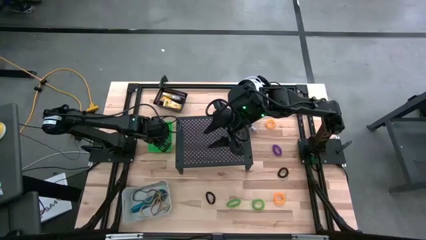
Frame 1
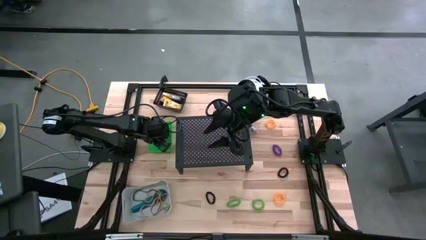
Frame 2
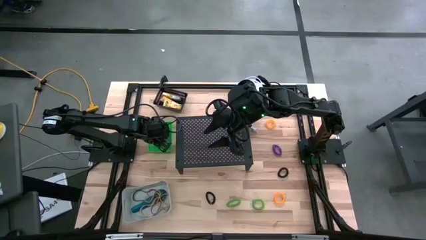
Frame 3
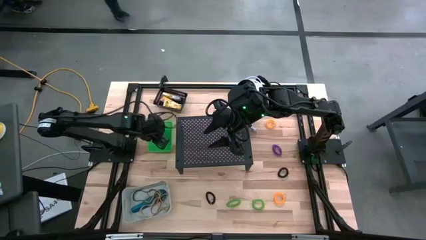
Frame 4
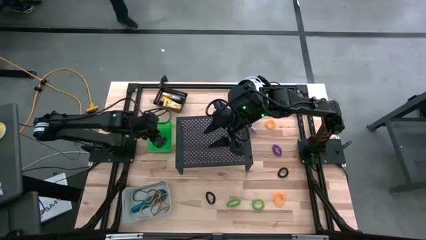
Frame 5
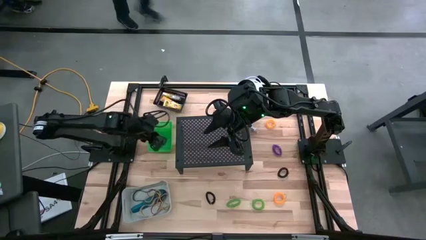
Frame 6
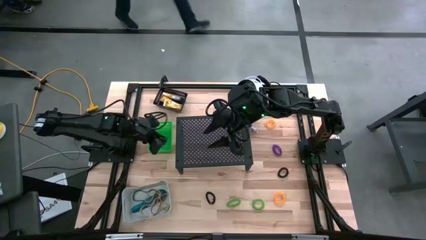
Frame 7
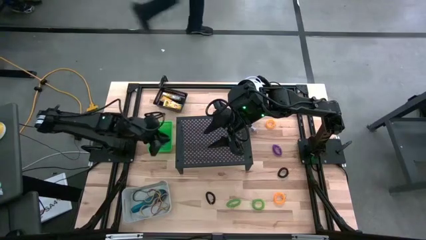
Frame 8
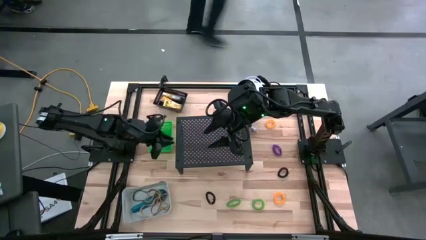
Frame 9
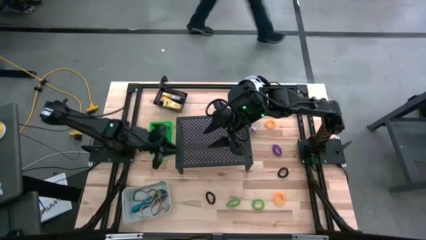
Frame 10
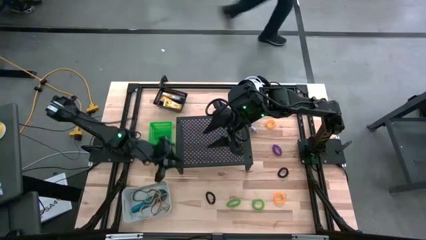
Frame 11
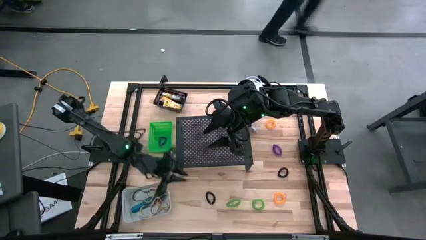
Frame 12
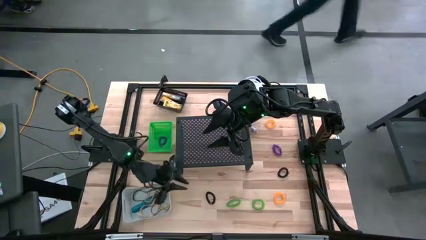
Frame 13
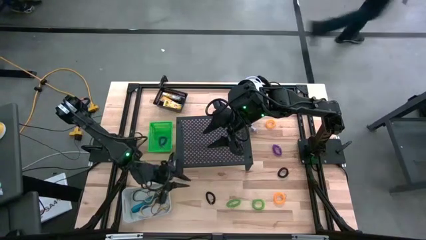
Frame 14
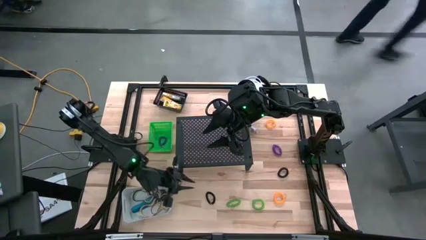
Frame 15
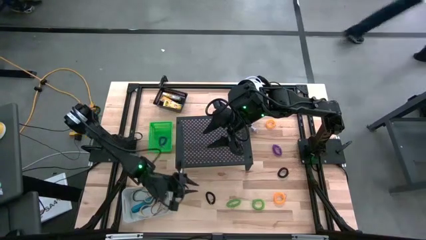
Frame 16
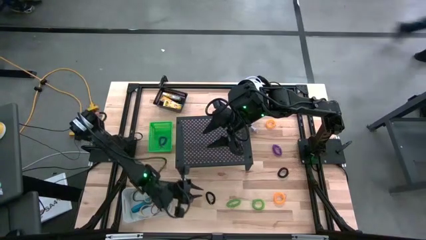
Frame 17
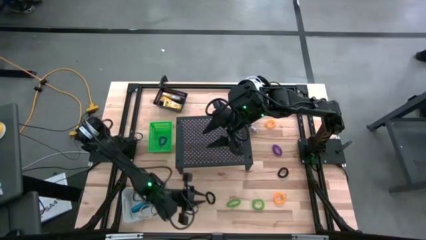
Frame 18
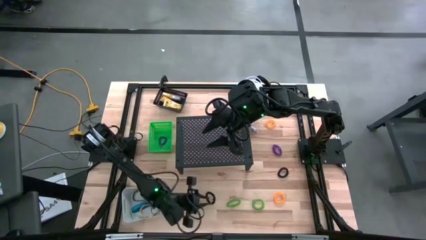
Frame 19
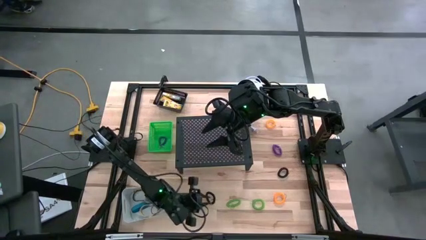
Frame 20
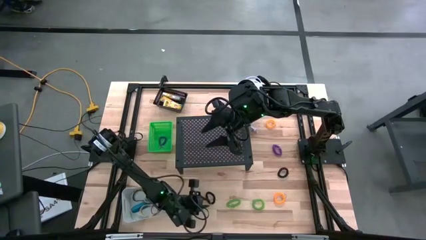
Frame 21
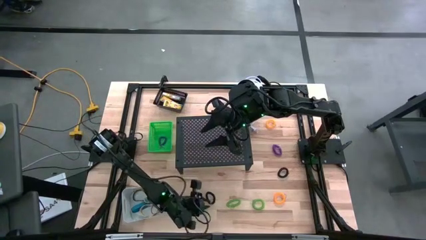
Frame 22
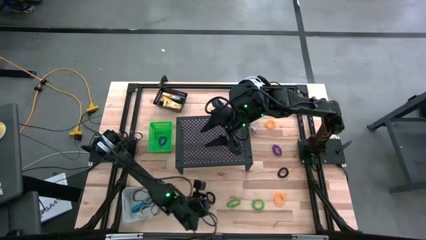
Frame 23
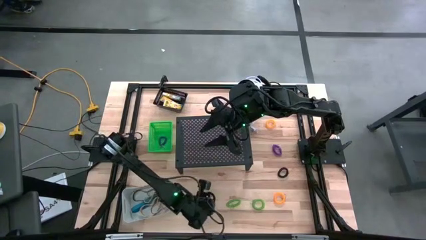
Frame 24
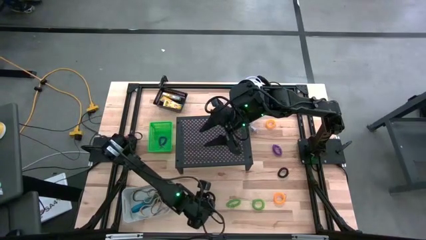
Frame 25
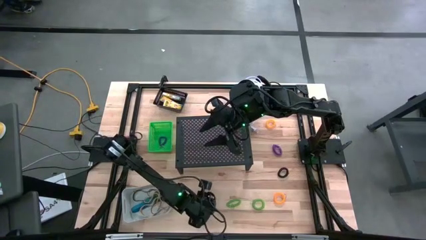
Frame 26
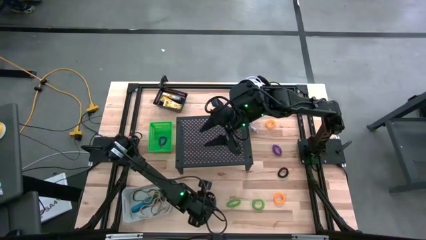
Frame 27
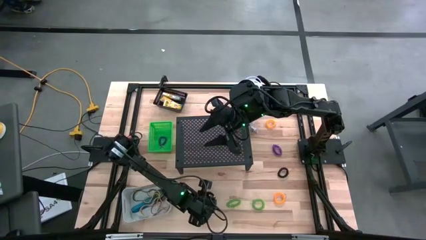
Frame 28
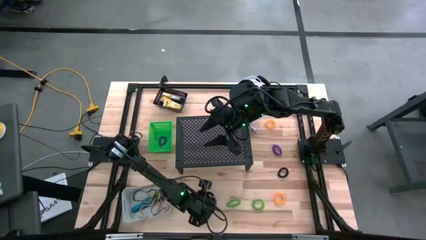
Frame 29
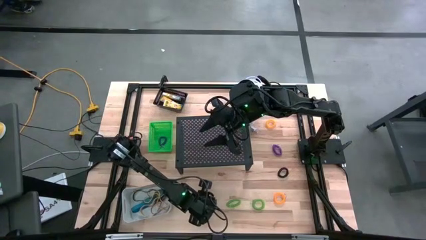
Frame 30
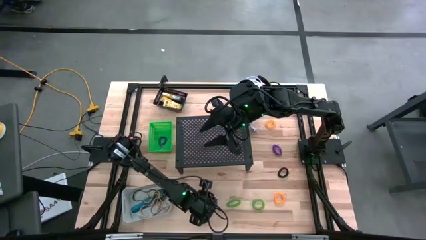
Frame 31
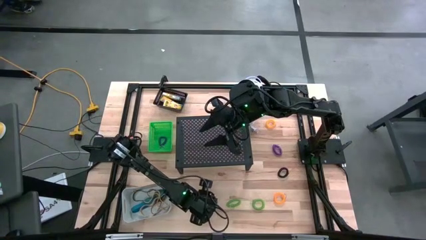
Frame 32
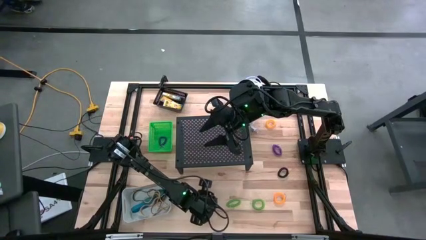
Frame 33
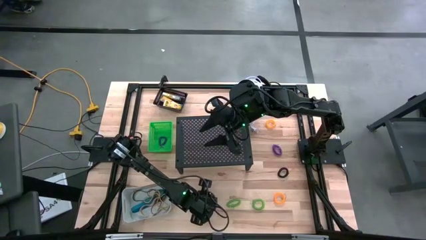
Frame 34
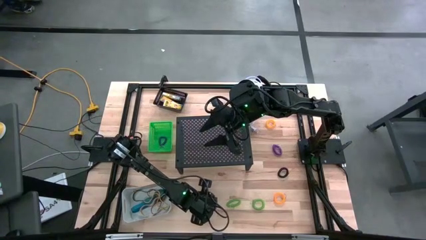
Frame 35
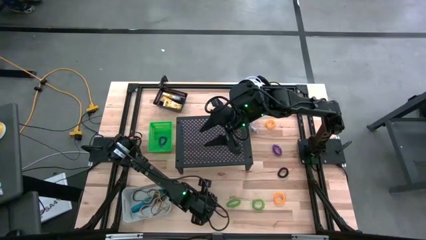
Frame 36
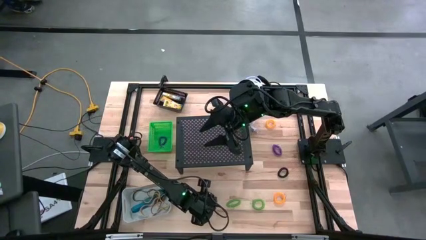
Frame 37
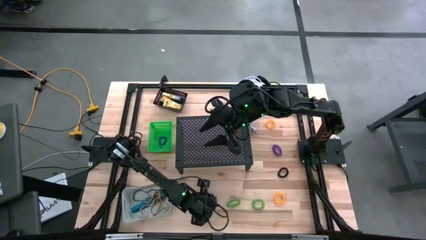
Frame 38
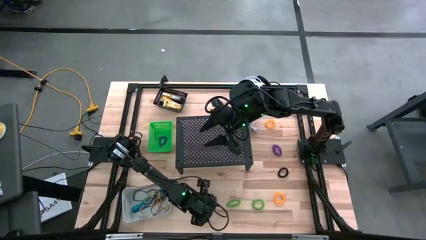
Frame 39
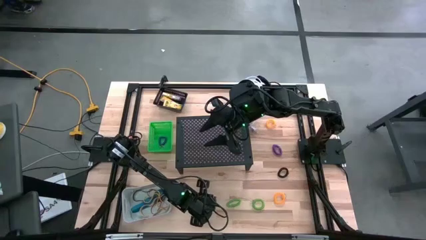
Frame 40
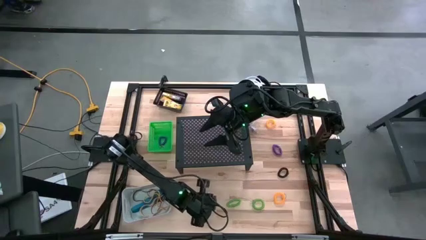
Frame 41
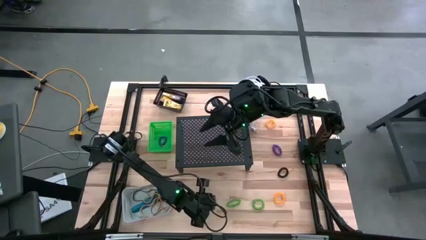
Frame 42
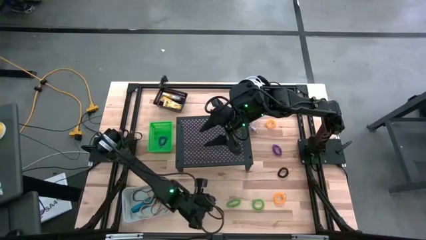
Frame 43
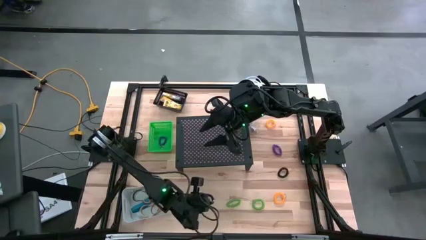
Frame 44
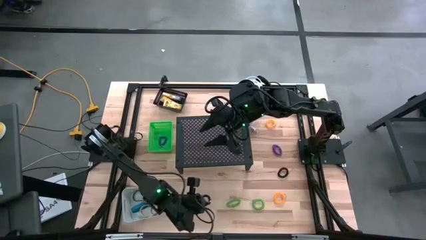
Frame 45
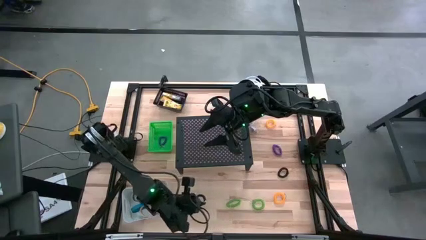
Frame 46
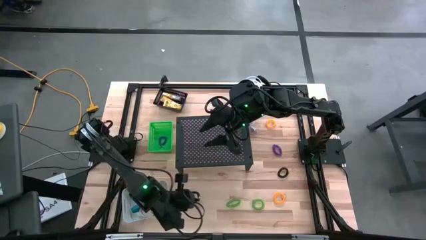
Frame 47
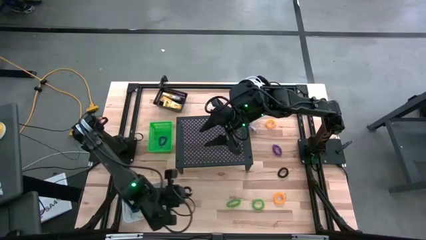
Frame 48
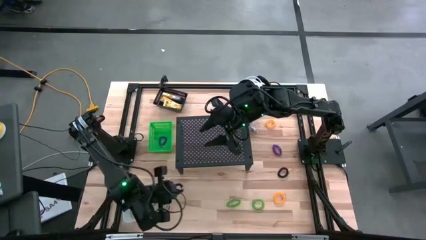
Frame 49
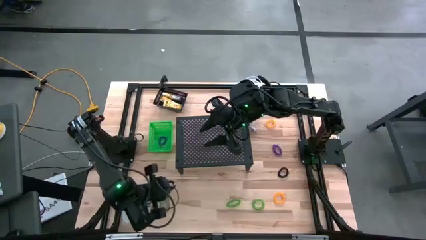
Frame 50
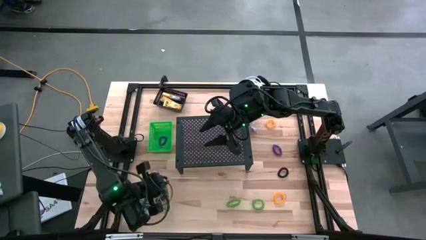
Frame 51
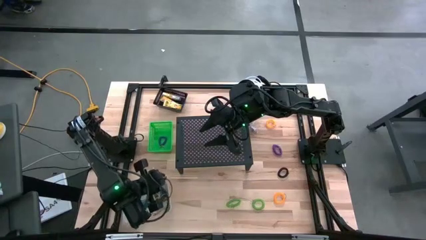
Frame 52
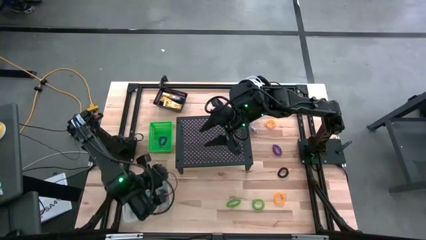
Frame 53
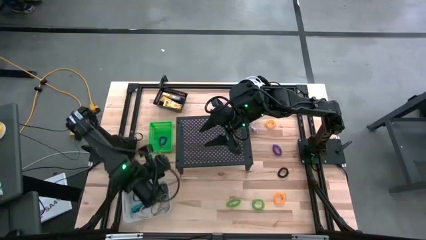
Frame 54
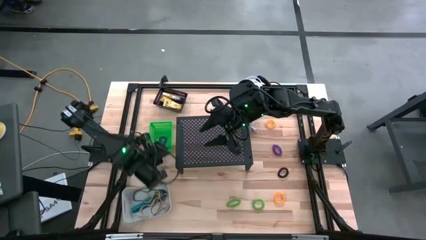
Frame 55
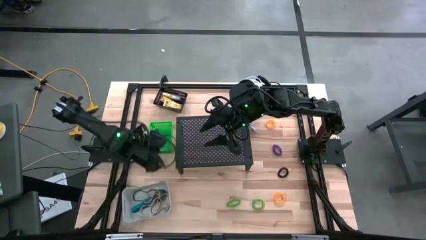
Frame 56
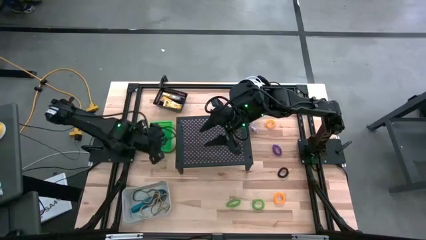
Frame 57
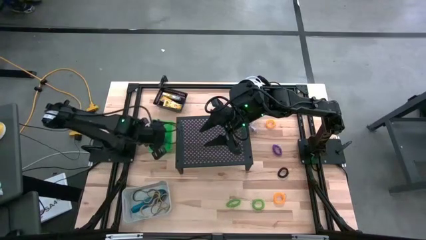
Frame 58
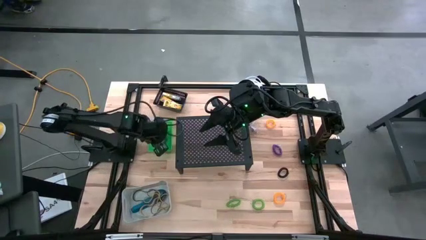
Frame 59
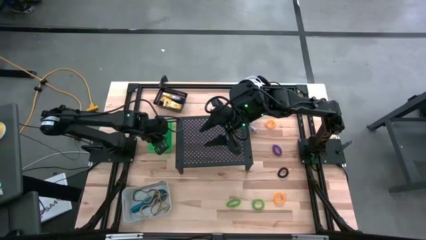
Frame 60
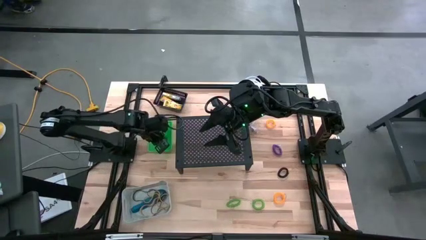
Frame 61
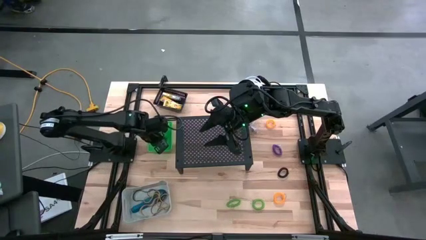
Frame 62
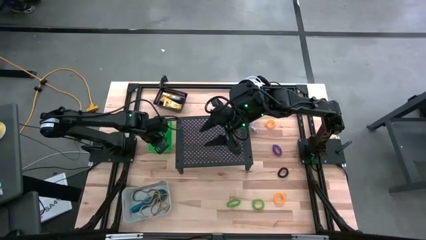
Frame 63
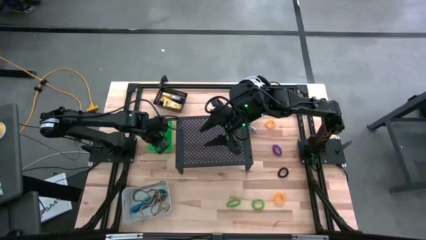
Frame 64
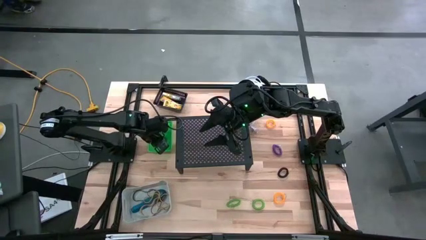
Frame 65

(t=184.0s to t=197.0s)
Task: Pick & Place Office Desk Supplies
Put the left black spring keychain into the green bin

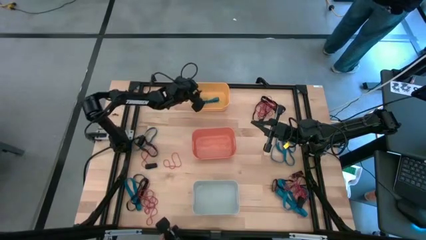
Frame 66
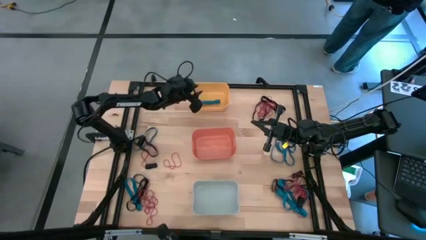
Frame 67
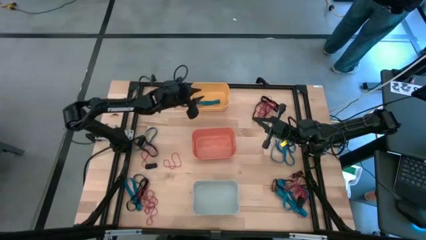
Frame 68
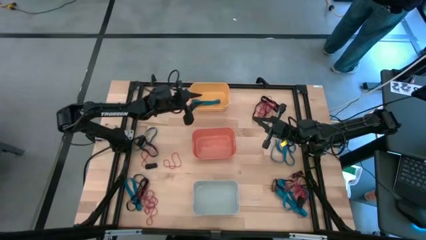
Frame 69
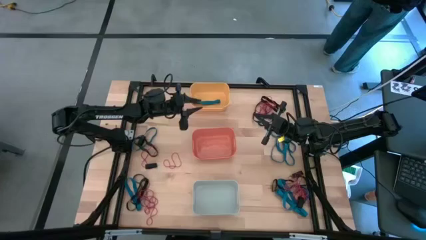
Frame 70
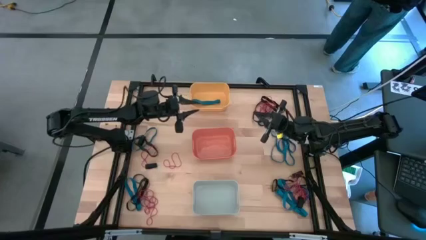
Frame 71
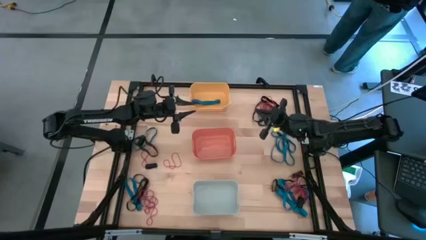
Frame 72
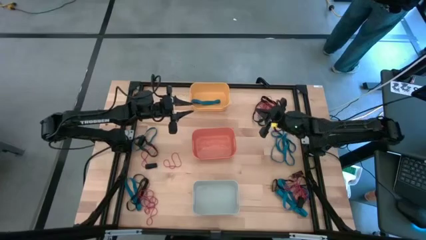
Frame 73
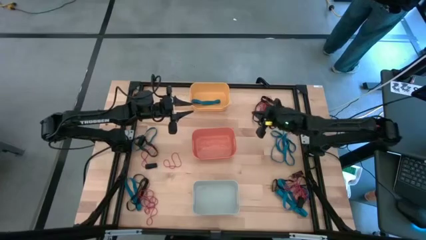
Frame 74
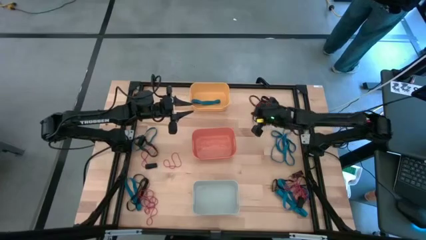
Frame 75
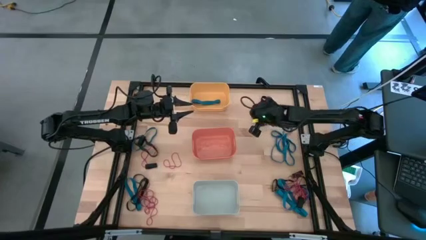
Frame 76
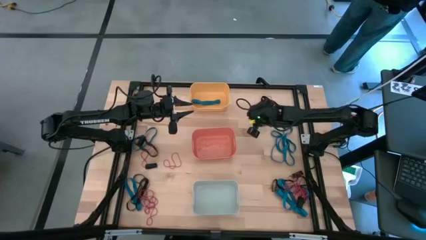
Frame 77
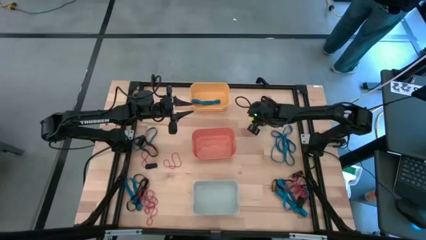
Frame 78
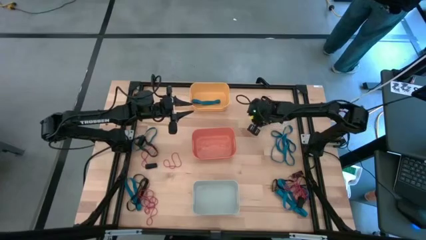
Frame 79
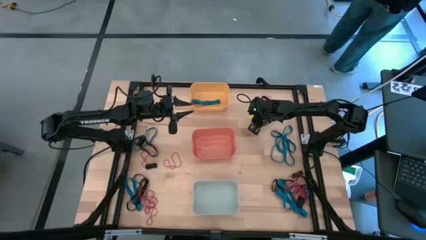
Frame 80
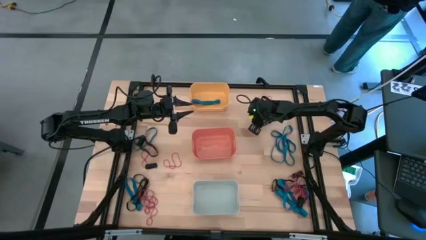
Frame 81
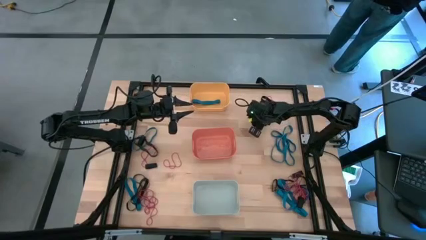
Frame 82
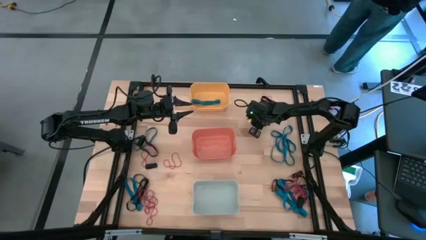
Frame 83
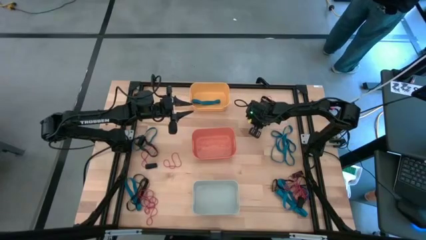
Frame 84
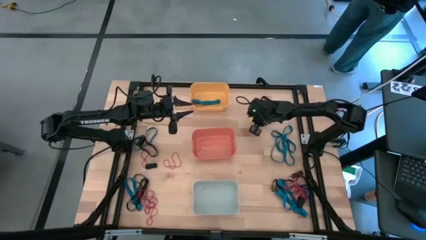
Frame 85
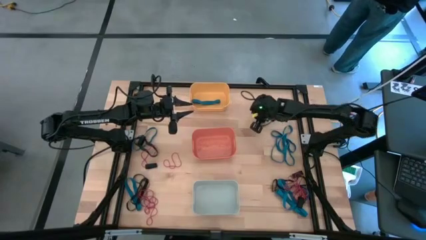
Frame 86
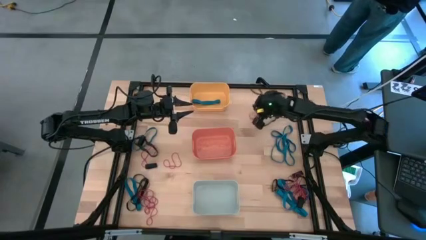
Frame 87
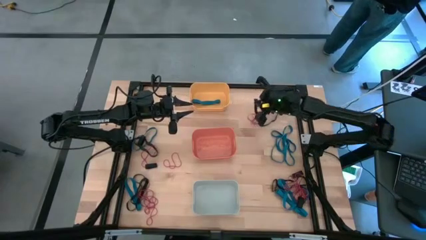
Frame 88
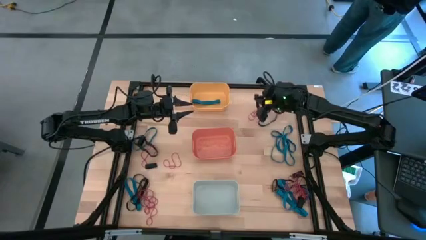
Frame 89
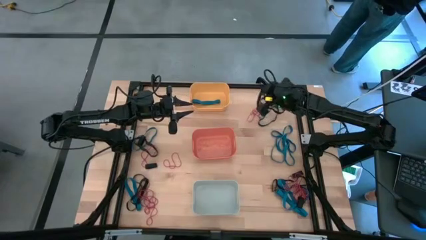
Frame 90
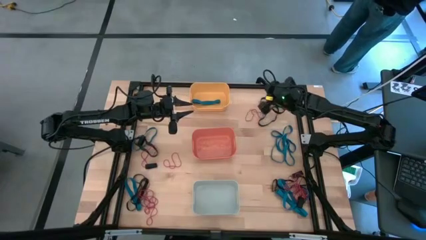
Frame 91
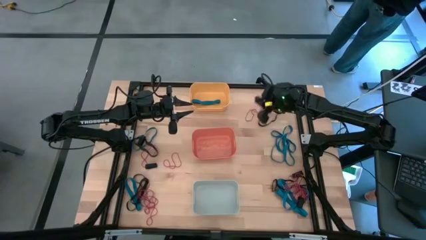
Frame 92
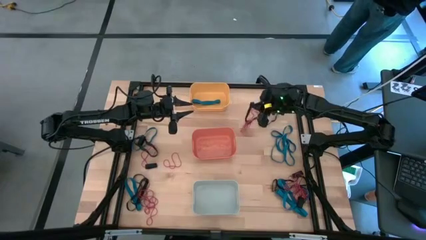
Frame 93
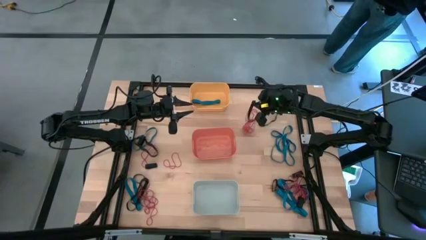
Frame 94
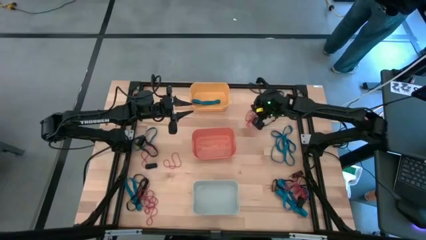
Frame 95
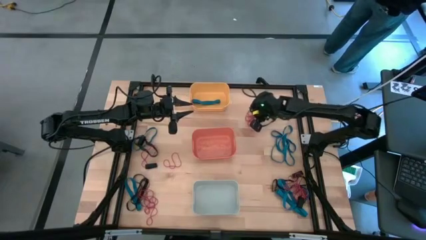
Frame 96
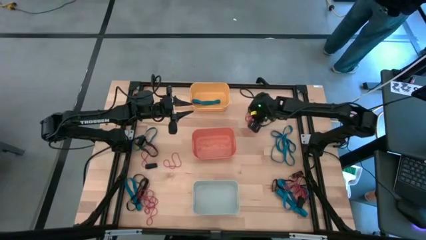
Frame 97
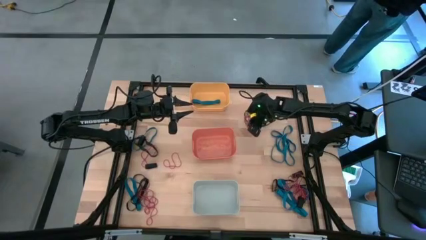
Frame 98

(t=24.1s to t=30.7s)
Task: Sort rubber bands into baskets
Put the black rubber band in the orange bin
